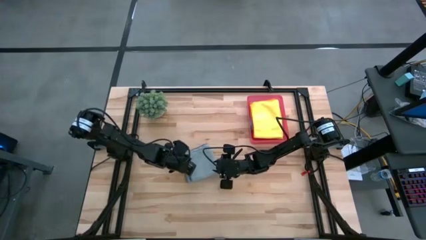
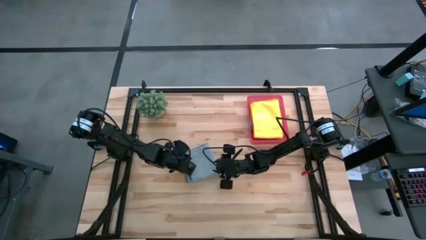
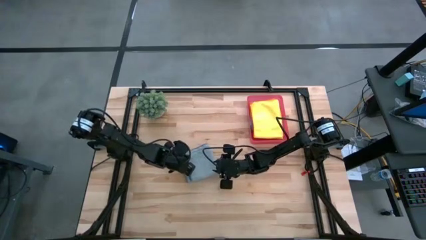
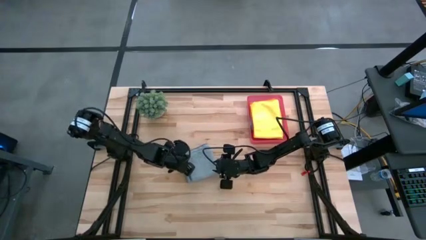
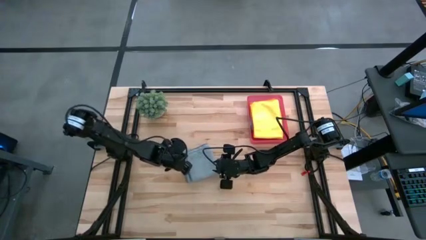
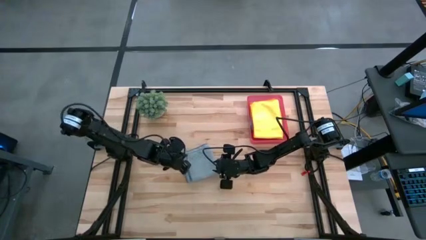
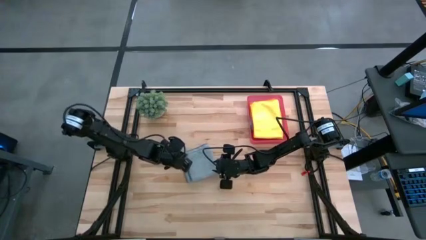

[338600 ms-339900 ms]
Task: Fold microfiber towels
Fold the gray microfiber cloth

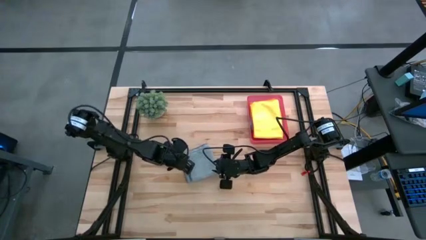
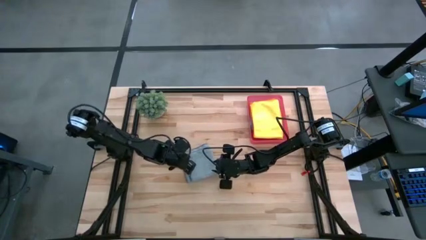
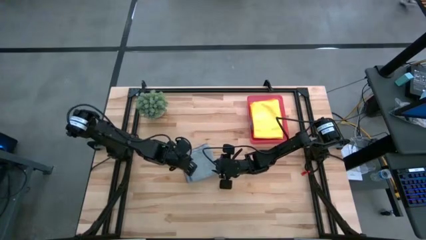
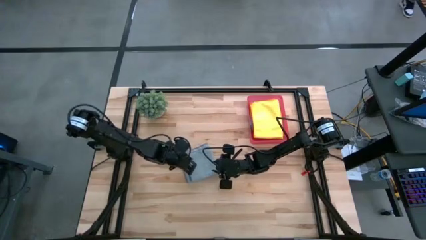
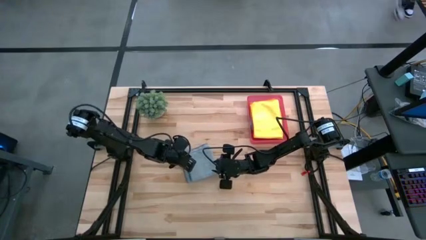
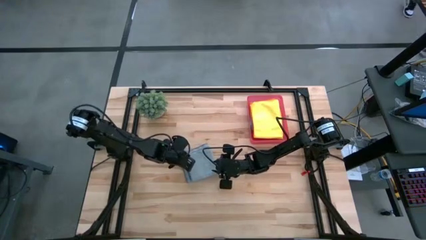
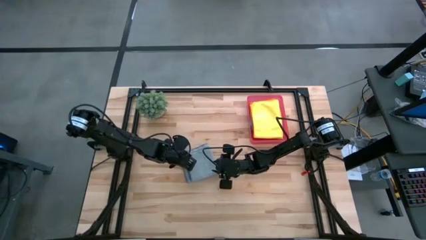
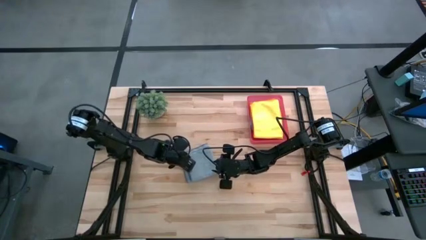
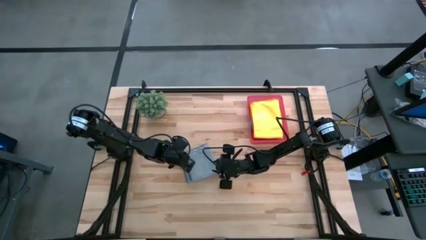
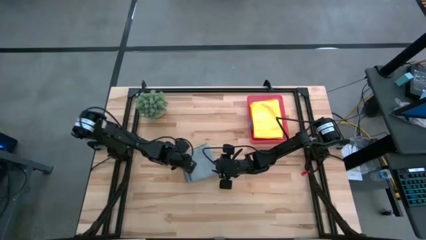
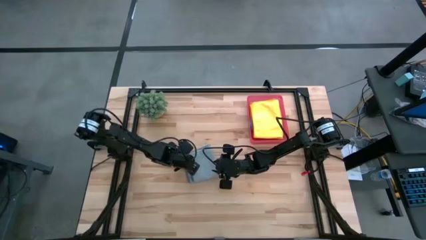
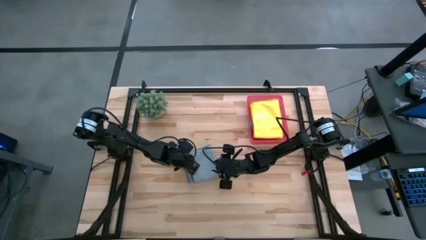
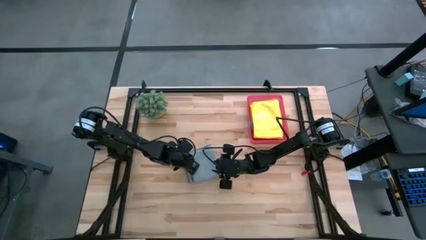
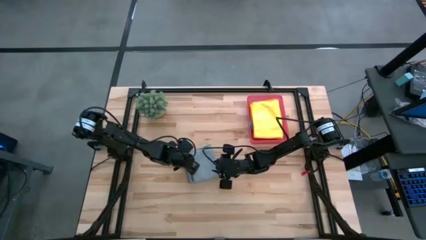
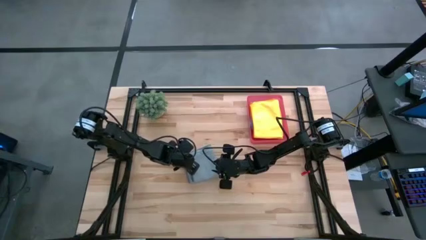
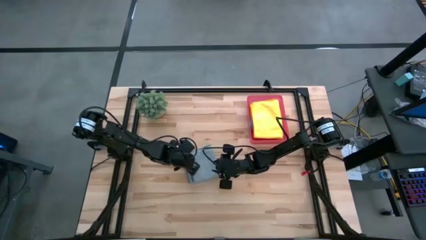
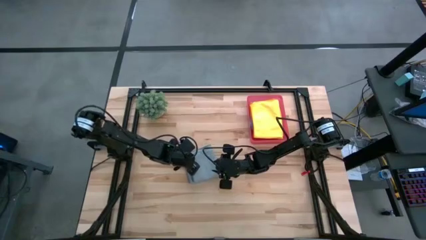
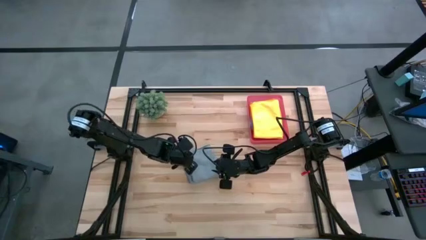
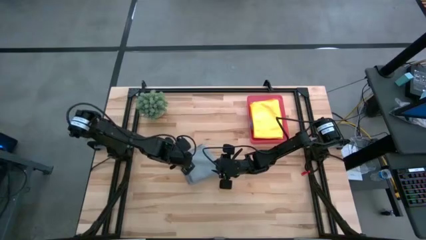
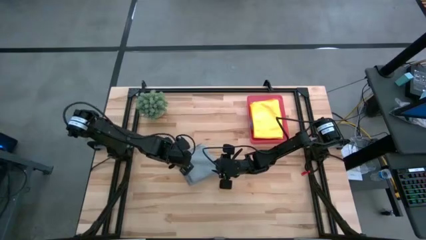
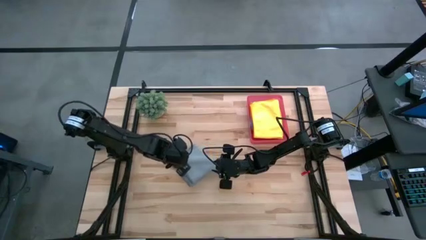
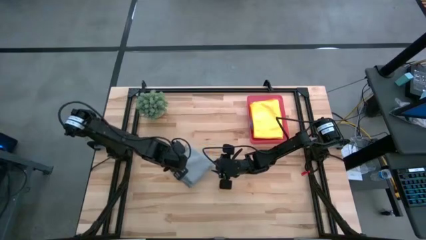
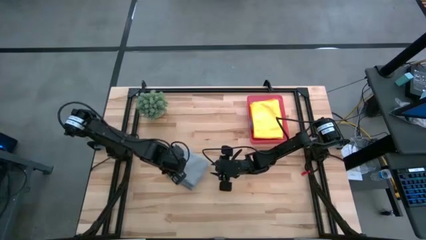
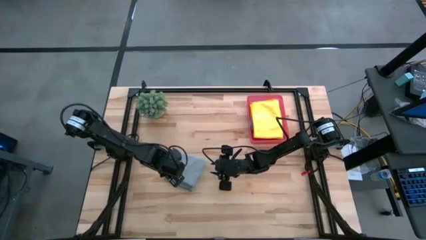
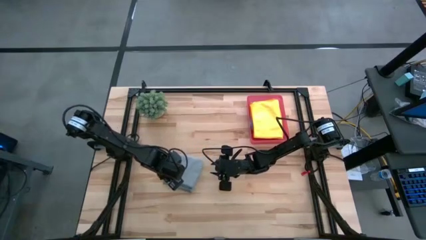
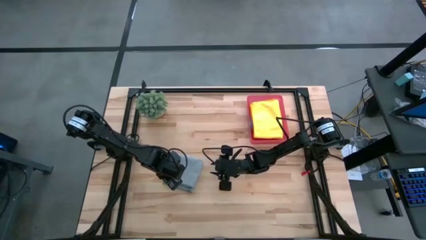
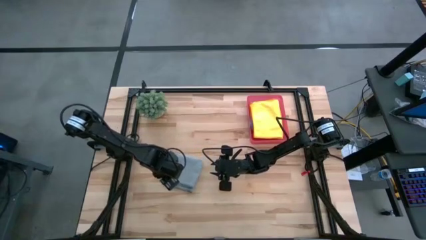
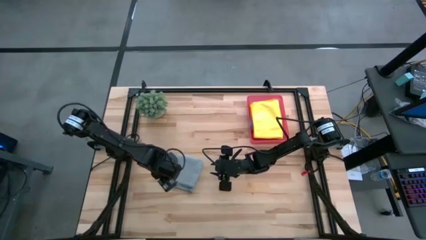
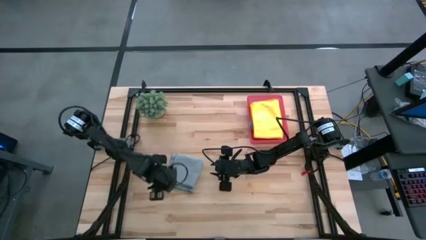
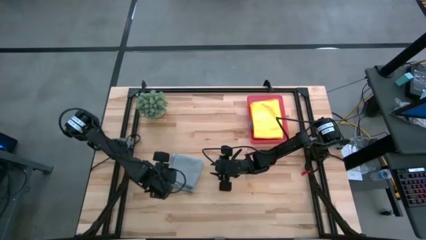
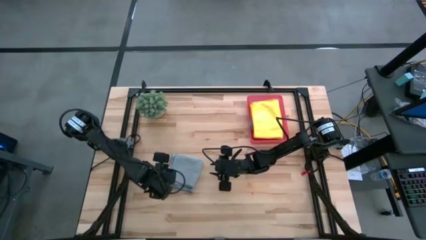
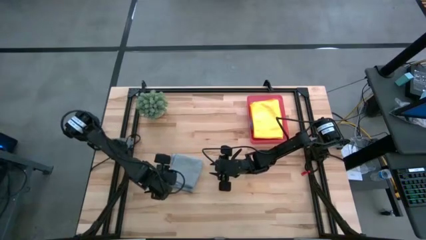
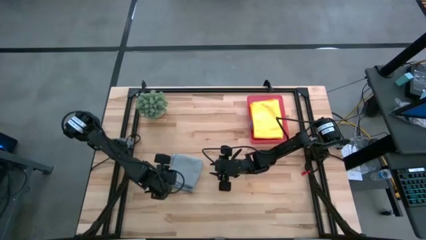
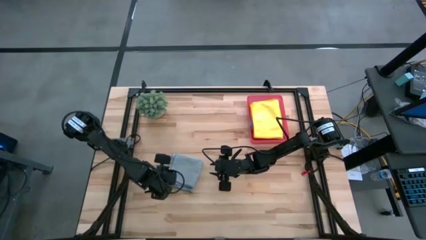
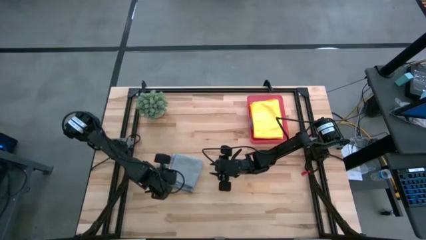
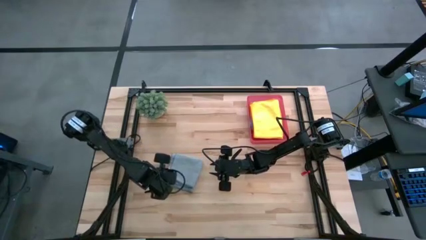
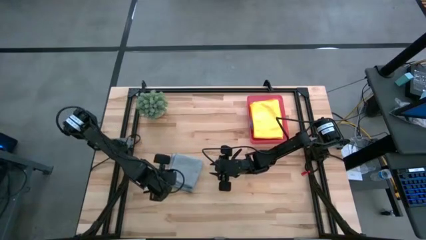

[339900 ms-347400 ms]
Fold the gray microfiber cloth

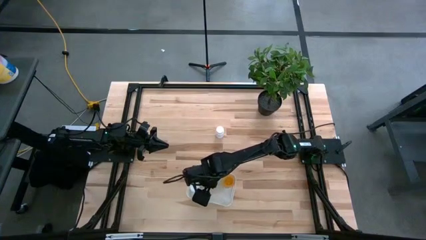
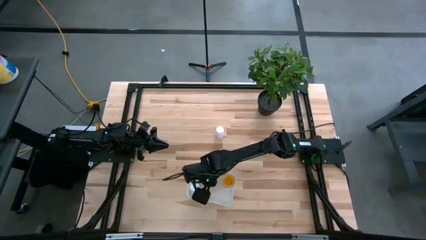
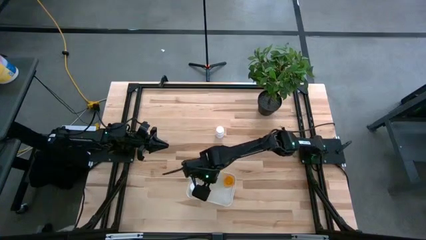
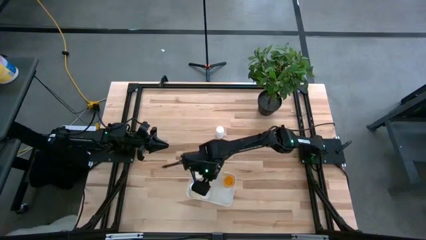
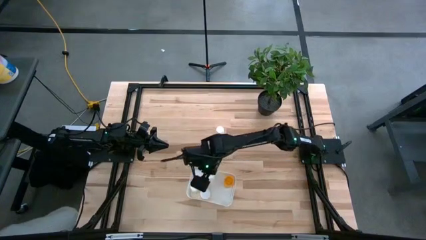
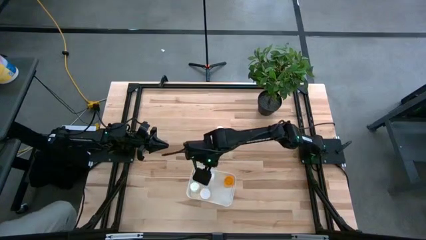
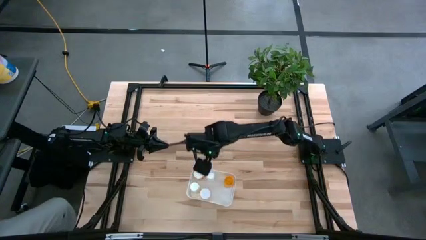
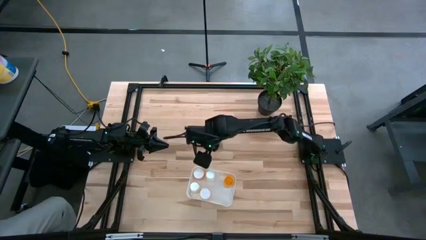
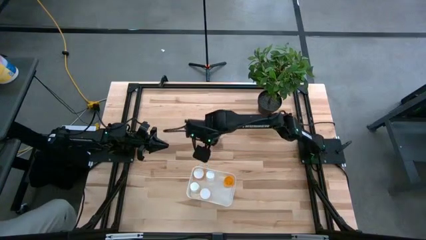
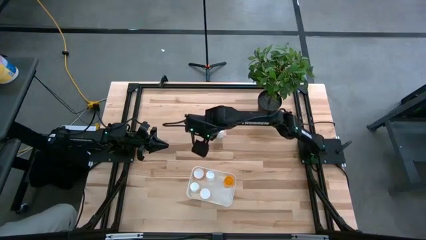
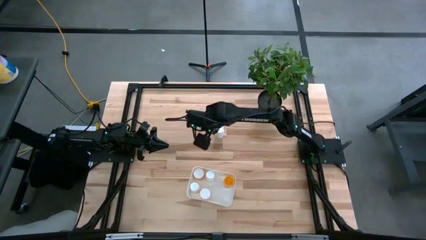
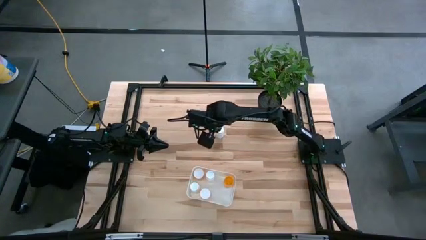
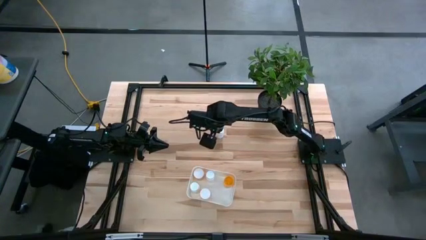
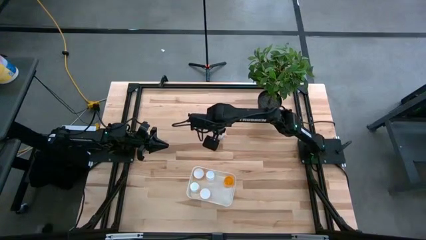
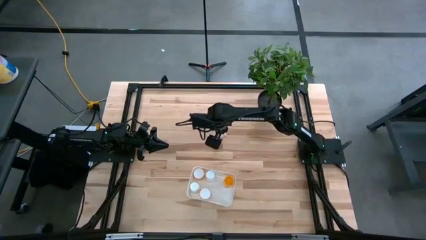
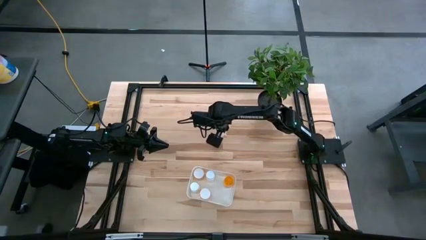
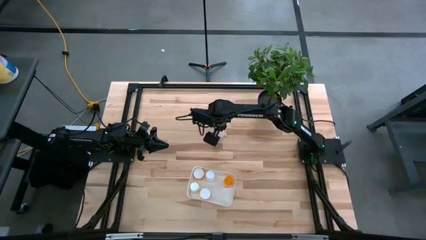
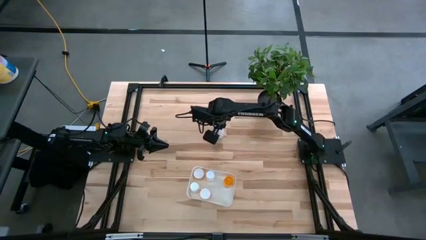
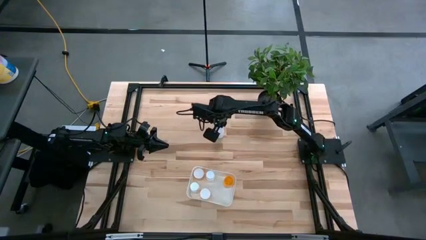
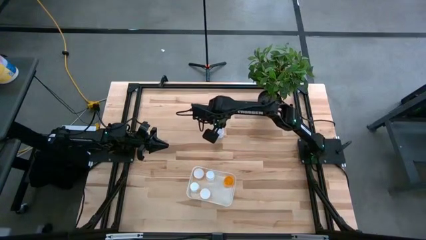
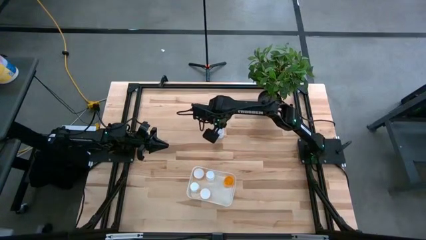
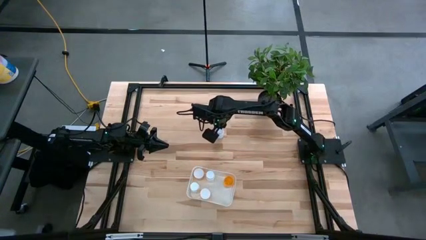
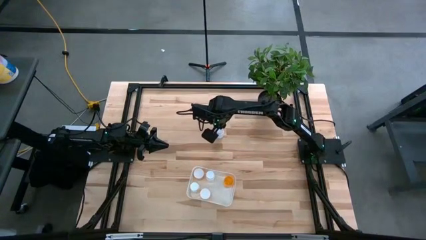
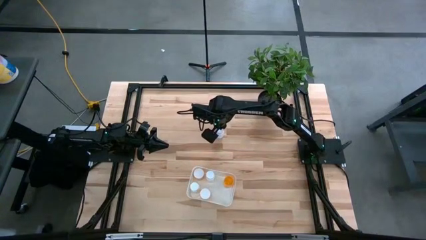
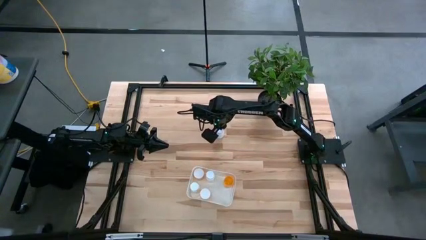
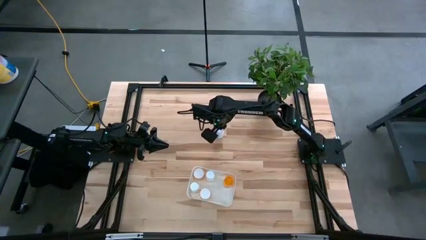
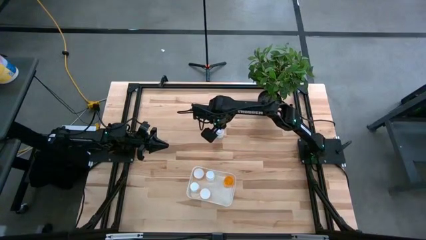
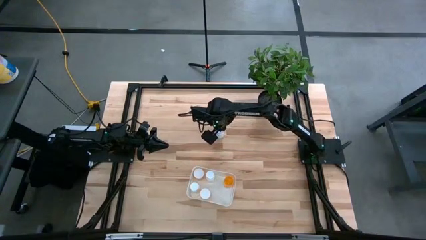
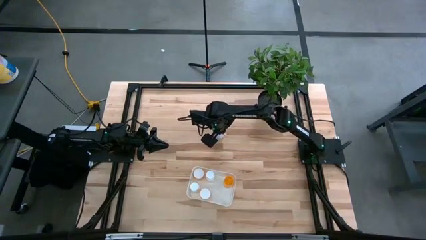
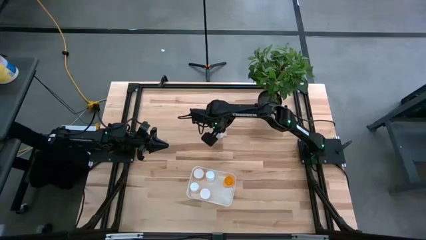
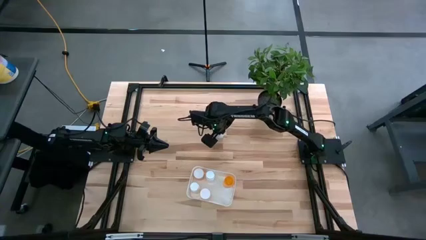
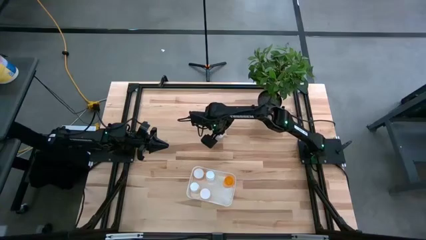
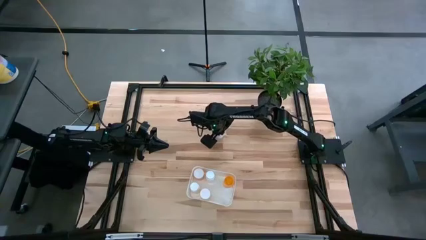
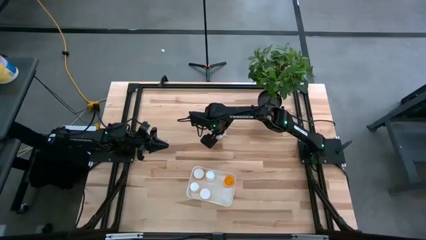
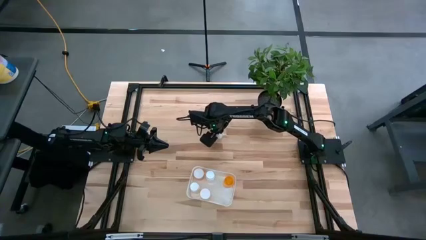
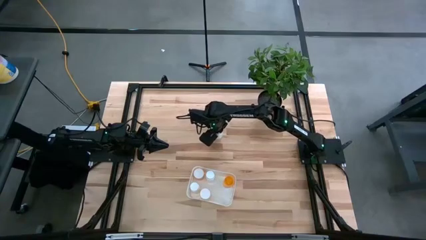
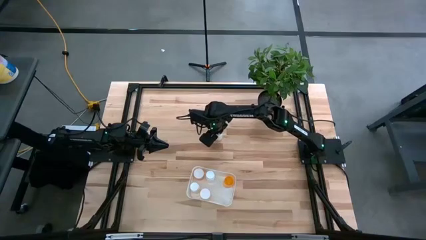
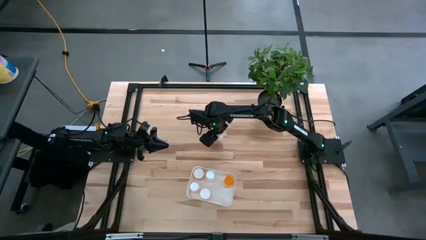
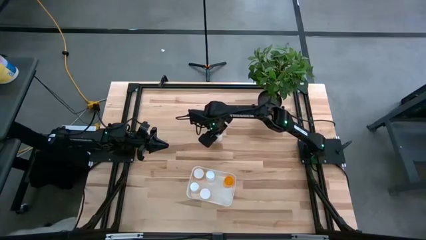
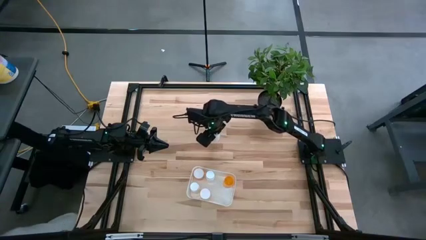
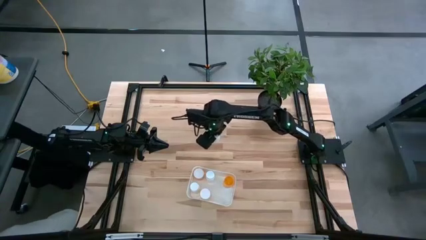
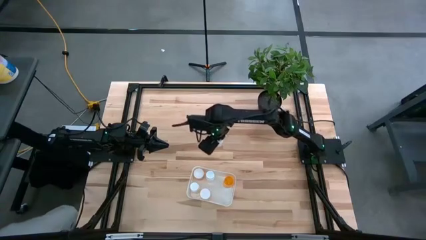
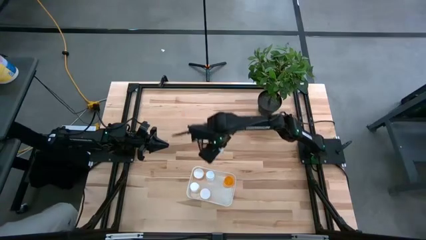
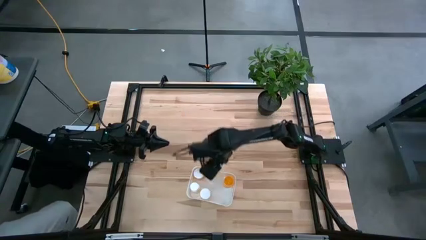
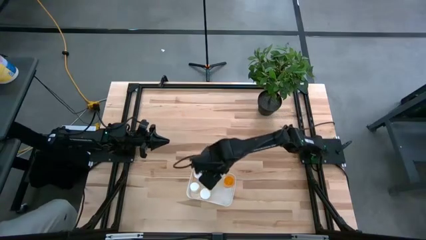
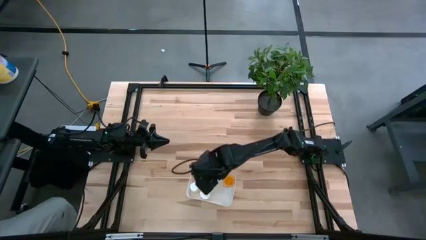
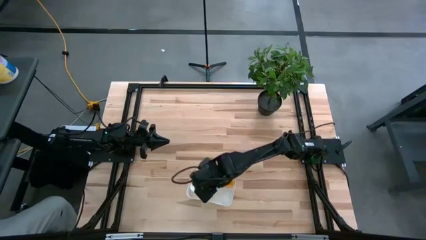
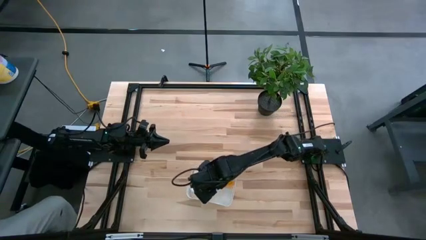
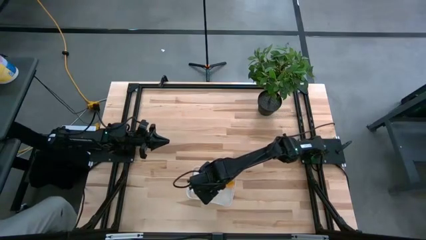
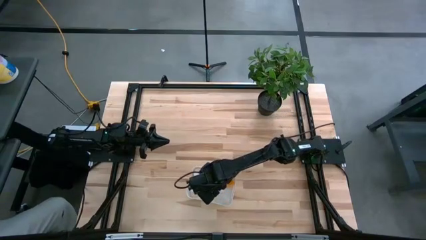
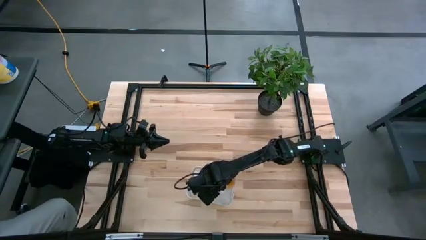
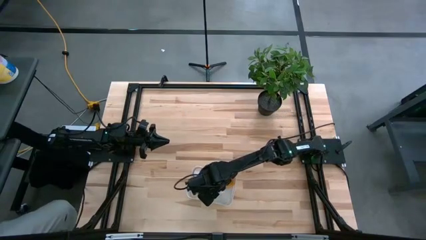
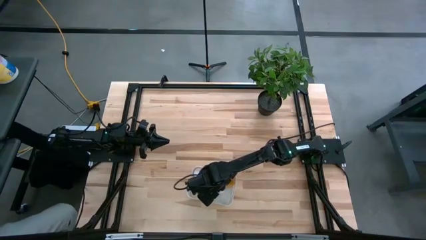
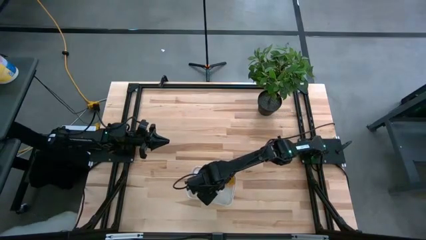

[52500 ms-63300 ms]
Task: Pick and place pill bottles into a basket
Put the white medicine bottle into the container
